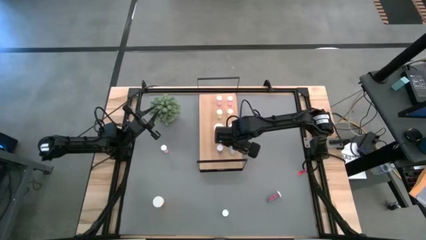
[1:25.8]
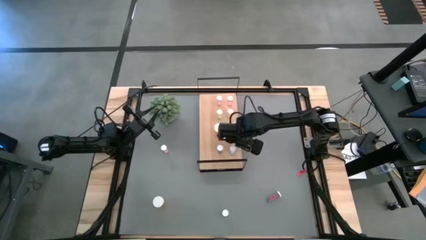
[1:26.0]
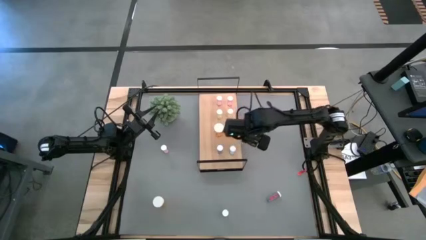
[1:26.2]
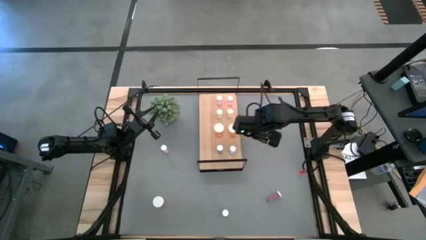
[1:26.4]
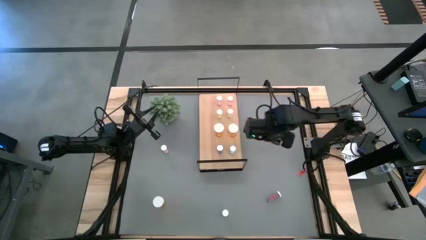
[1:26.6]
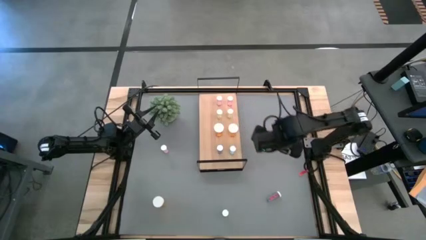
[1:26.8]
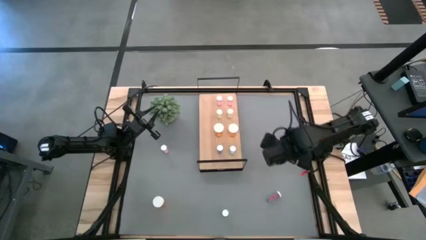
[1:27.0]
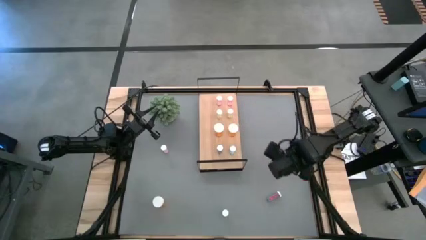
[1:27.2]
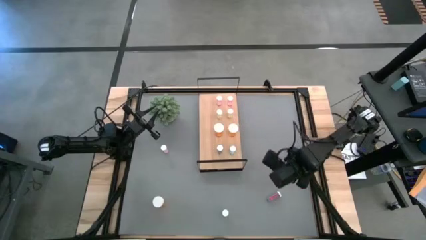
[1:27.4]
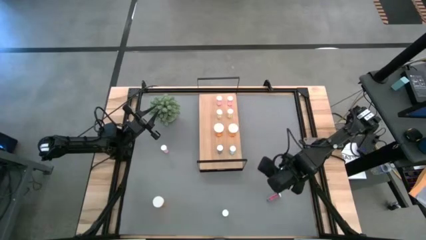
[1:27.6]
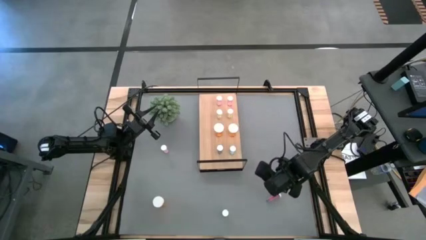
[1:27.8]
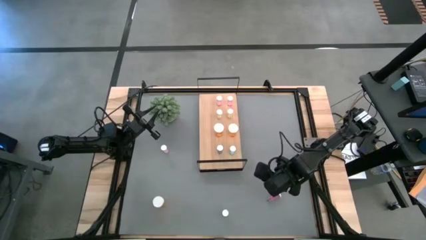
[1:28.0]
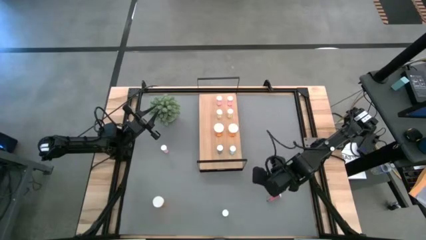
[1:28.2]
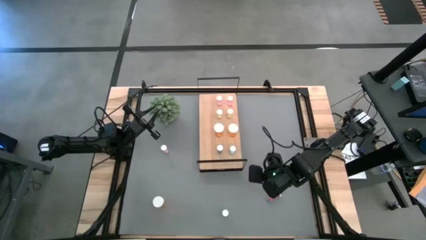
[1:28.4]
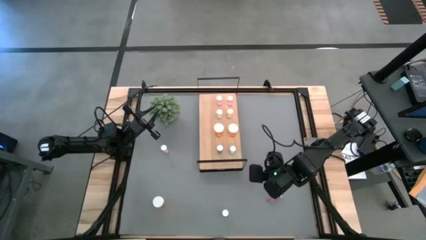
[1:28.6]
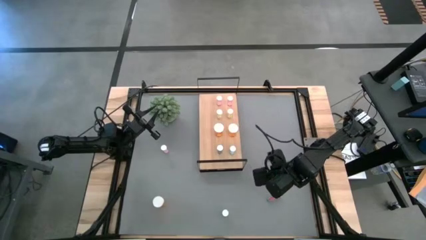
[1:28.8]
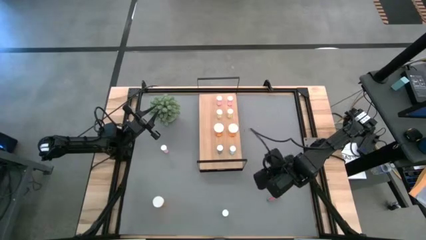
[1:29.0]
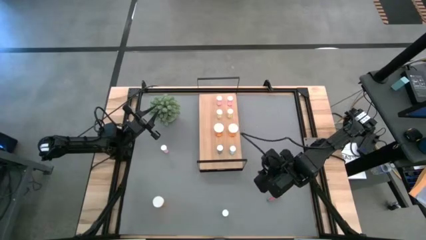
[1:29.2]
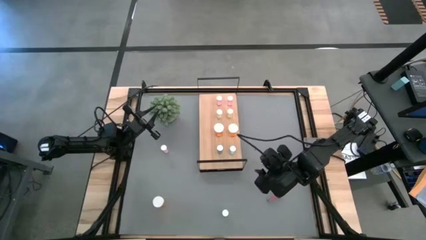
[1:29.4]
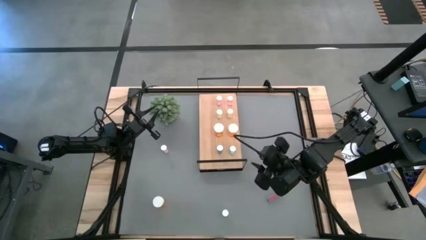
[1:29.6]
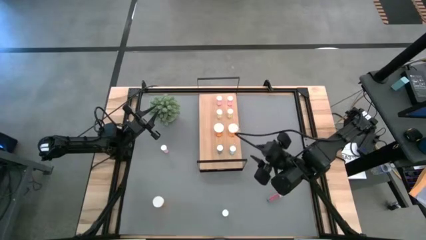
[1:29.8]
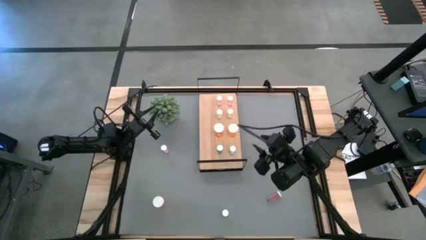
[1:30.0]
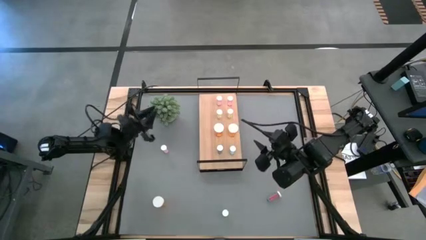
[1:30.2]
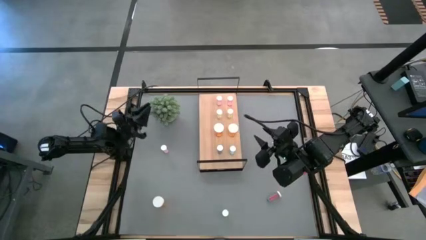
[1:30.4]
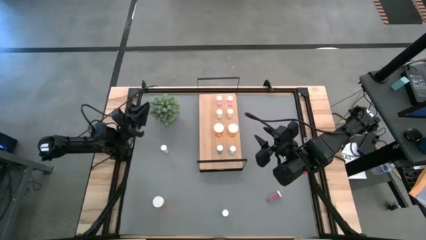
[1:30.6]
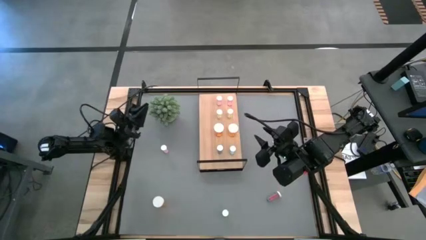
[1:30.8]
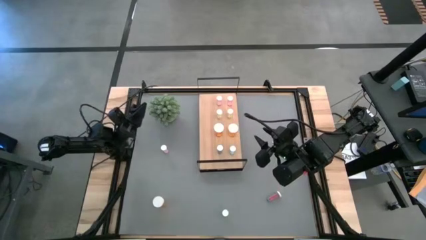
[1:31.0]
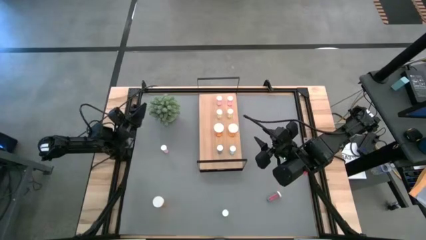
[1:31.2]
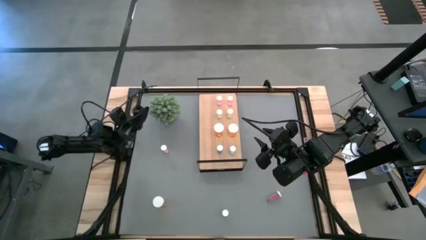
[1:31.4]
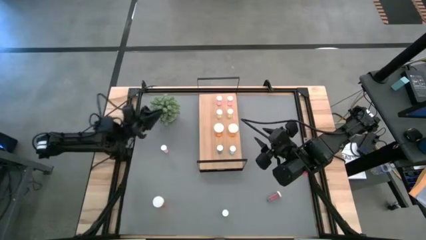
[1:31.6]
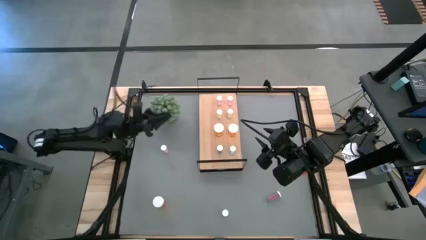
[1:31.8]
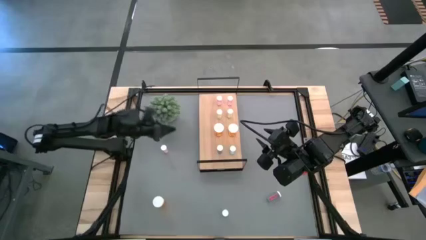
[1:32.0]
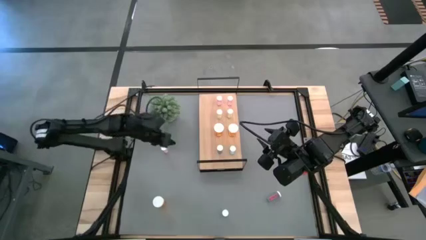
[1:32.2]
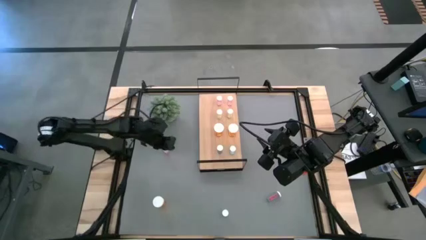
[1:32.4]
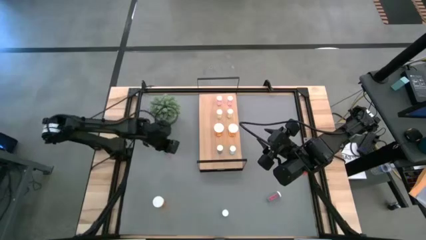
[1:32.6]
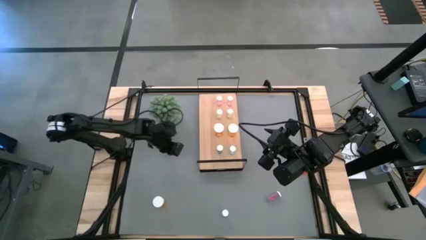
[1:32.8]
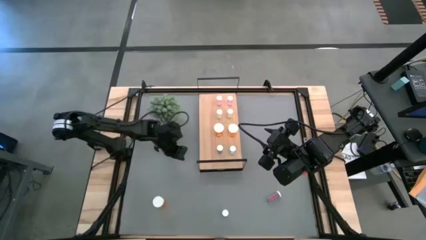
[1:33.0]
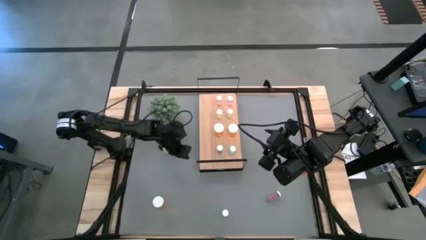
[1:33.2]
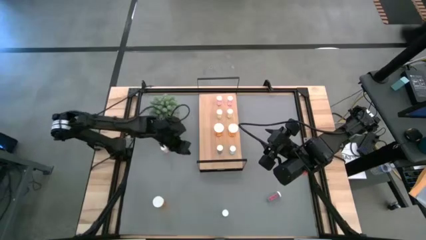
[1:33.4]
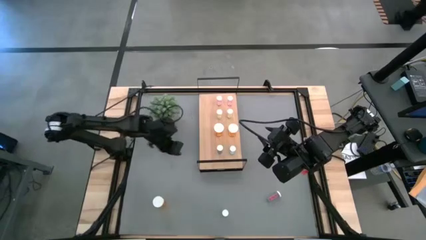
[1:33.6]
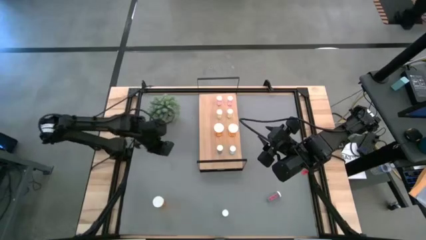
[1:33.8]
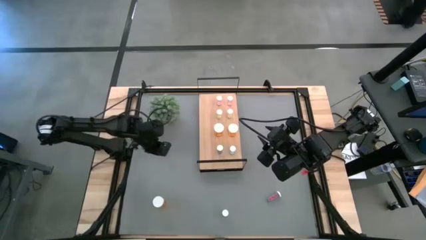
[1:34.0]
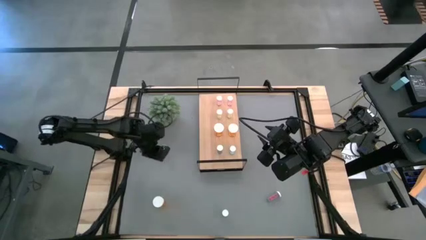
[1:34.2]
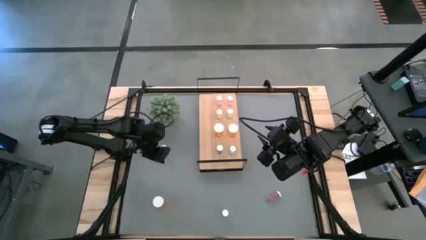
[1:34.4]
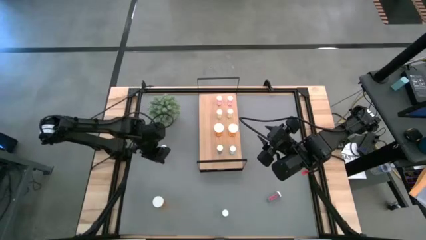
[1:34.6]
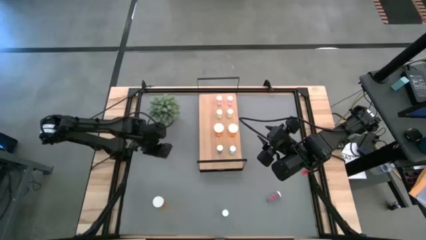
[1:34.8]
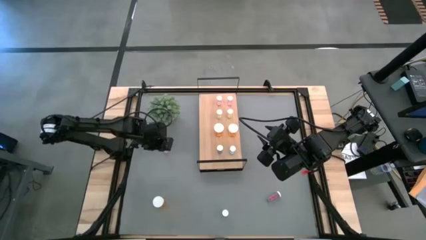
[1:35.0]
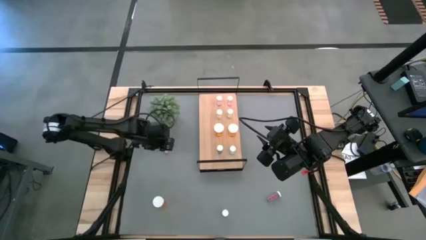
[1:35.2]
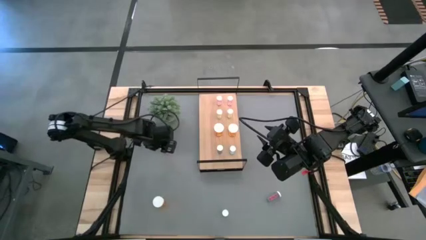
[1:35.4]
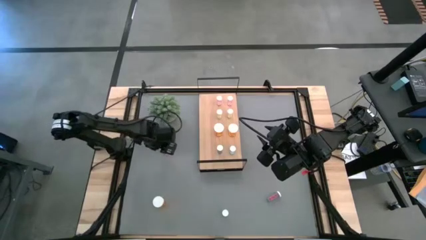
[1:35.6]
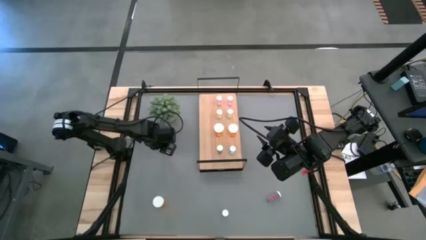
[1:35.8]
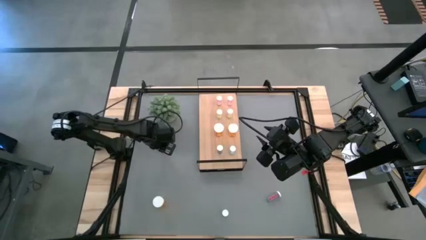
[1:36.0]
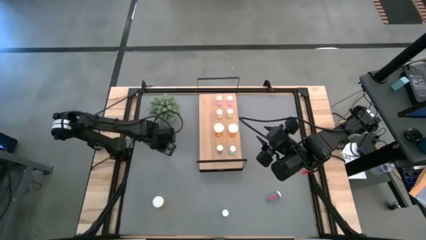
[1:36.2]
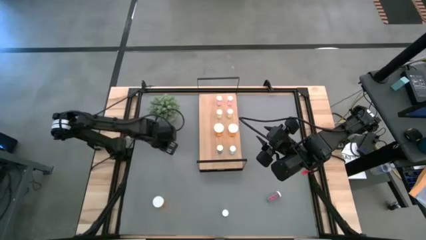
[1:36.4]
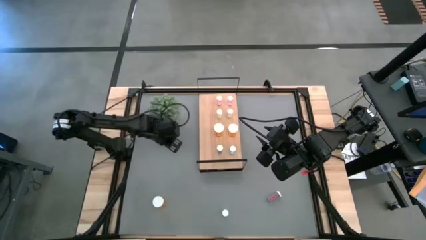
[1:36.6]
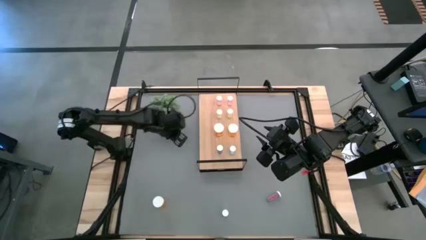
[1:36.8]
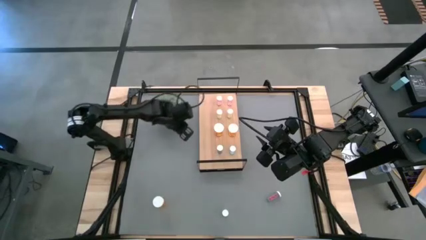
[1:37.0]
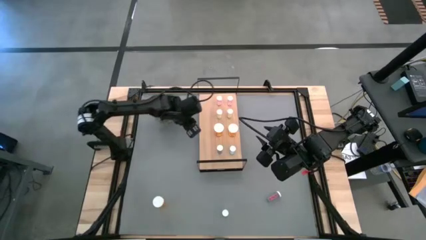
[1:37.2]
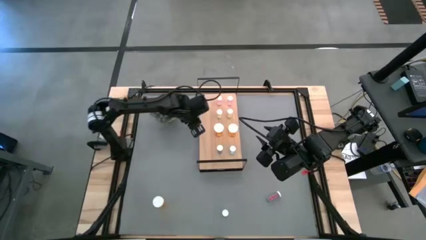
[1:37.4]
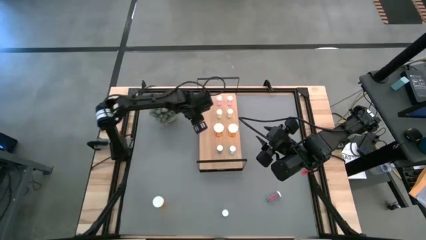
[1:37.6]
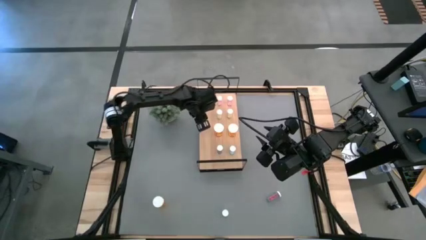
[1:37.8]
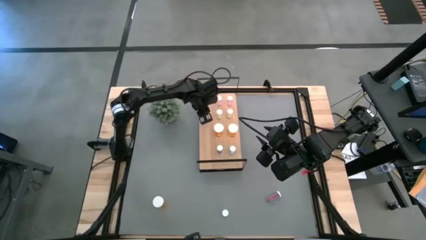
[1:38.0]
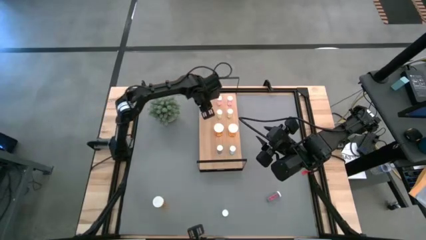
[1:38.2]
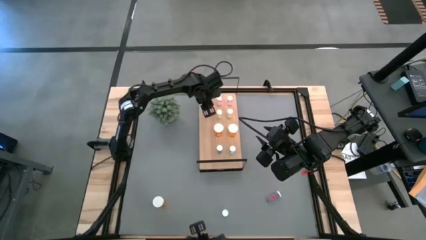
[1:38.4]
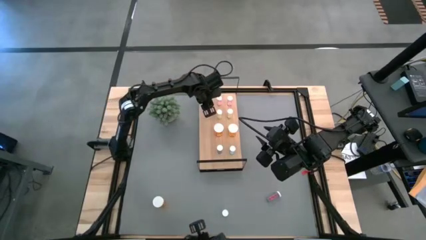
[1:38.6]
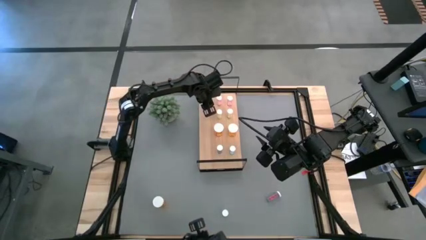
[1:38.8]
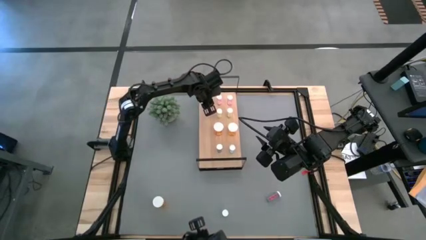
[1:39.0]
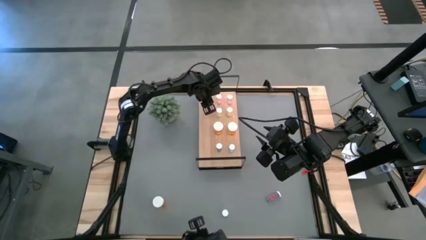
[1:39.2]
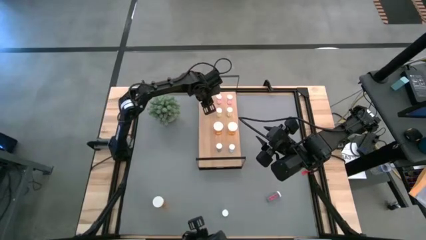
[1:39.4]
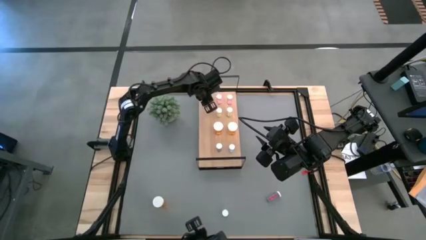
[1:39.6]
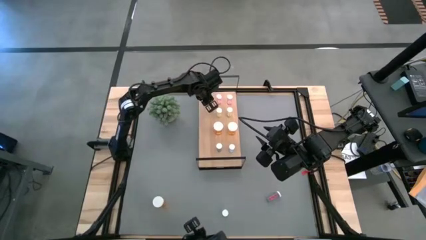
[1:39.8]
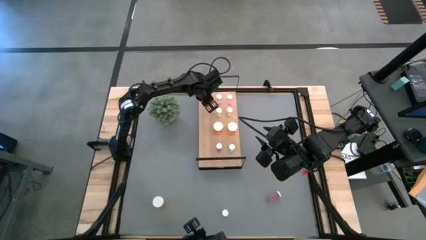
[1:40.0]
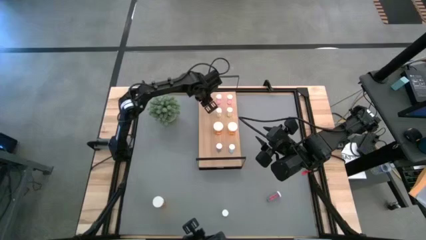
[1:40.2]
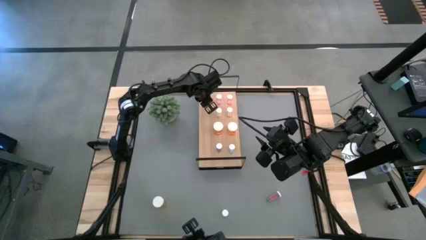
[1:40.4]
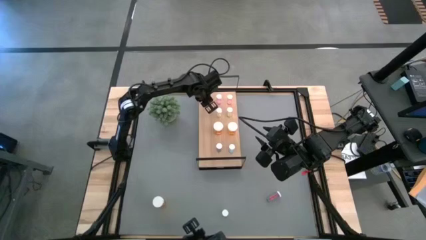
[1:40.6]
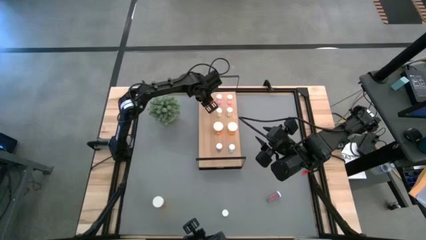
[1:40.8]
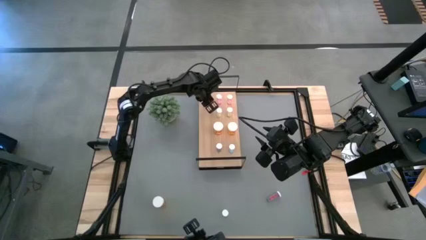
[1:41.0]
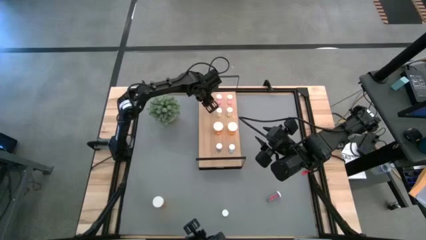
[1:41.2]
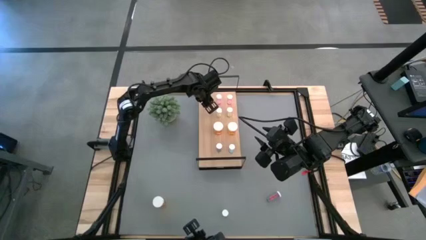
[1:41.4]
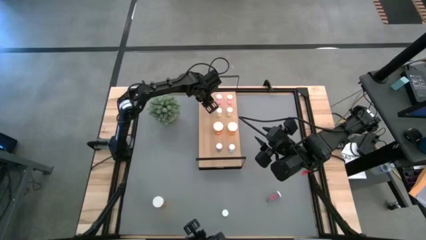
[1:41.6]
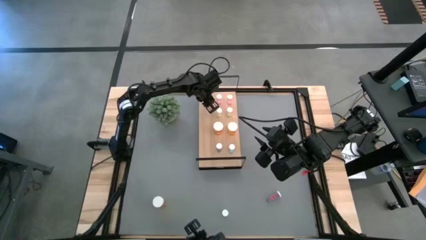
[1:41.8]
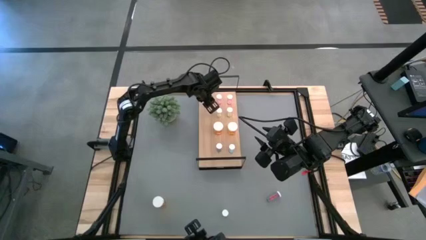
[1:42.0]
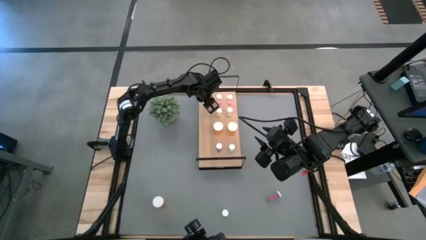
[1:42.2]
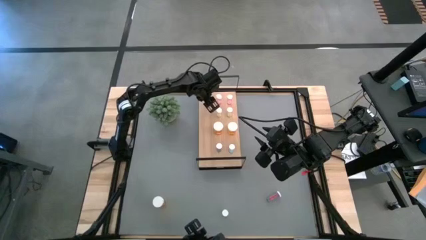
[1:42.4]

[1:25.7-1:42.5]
Task: Pick and place medicine bottles onto shelf by color
Put the pink pill bottle aligned with the other pink pill bottles on the shelf
